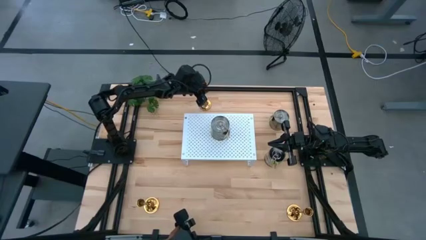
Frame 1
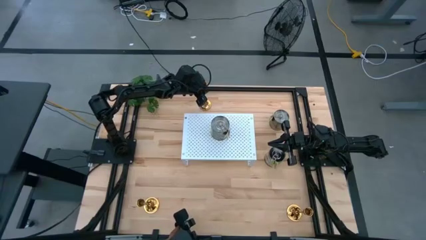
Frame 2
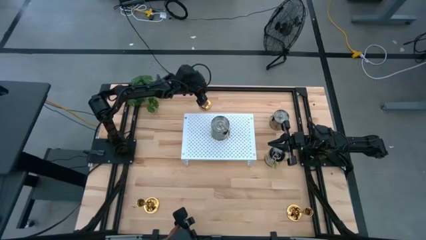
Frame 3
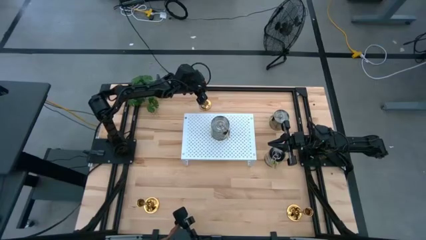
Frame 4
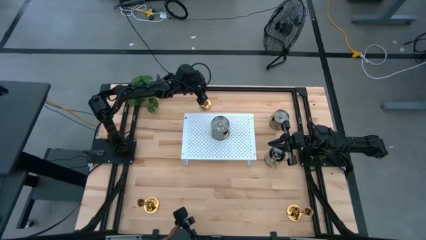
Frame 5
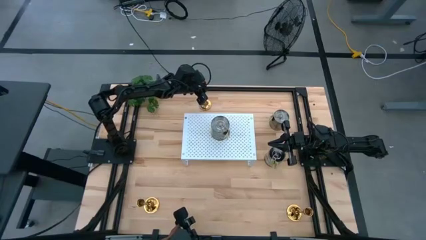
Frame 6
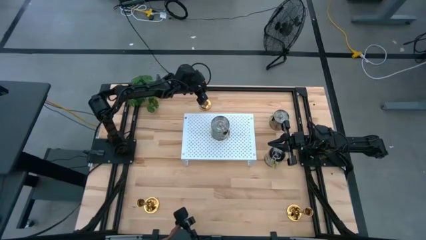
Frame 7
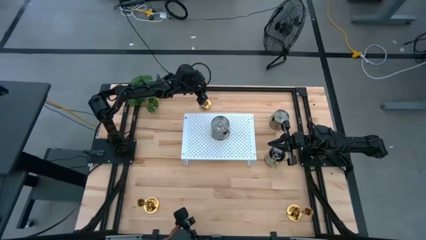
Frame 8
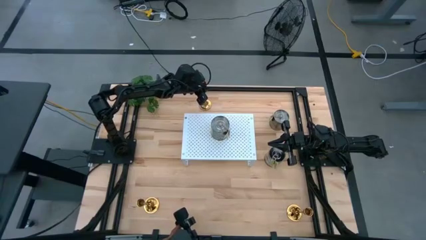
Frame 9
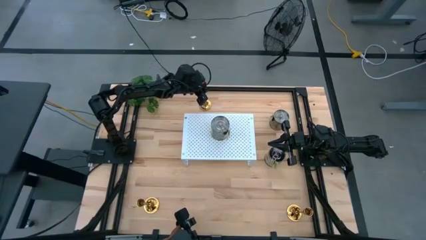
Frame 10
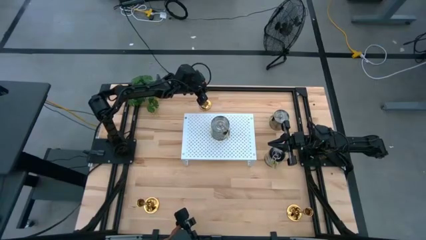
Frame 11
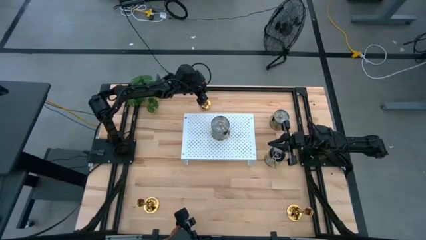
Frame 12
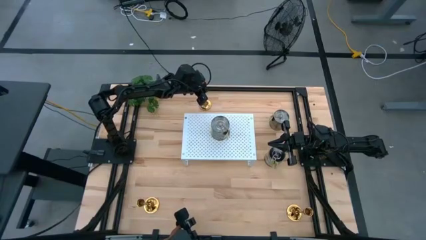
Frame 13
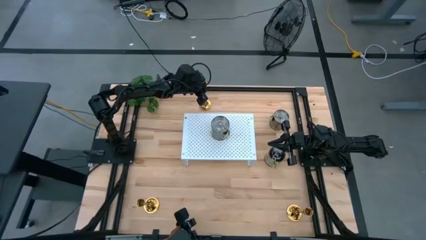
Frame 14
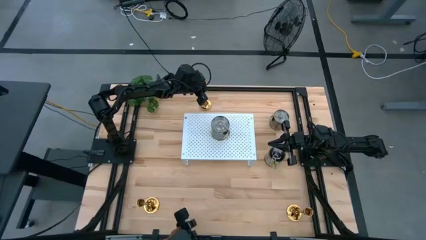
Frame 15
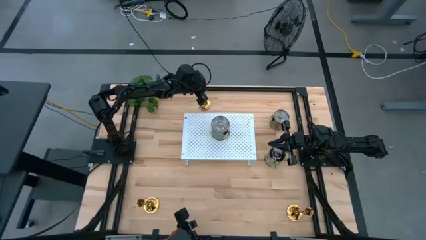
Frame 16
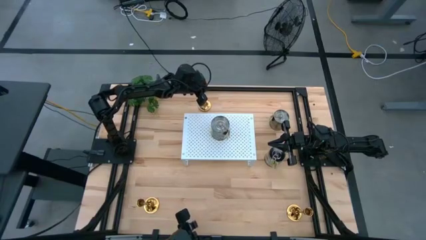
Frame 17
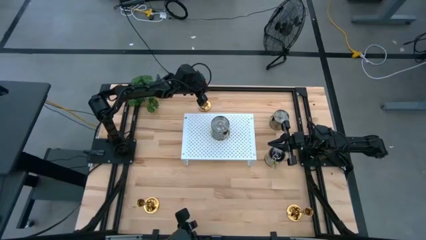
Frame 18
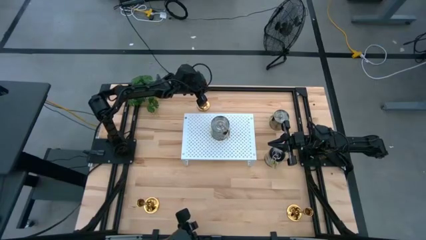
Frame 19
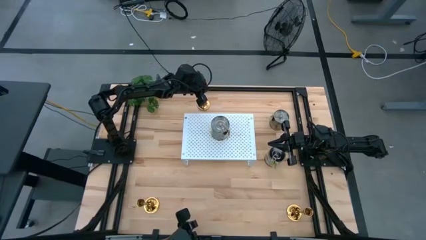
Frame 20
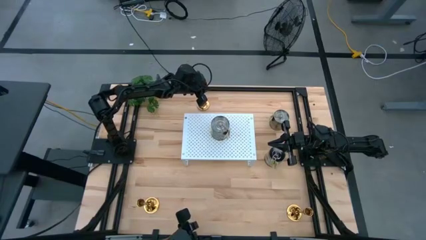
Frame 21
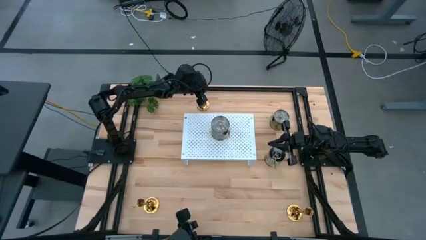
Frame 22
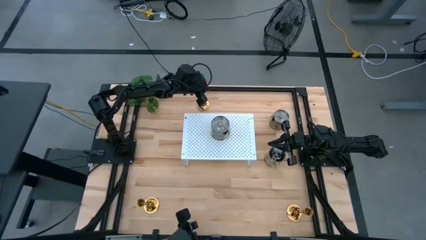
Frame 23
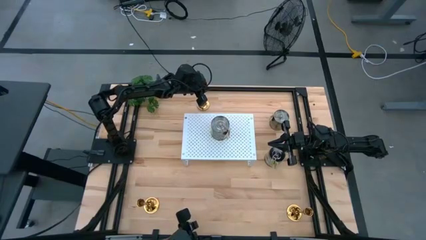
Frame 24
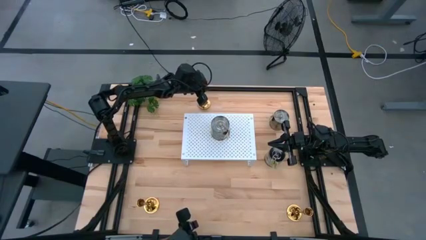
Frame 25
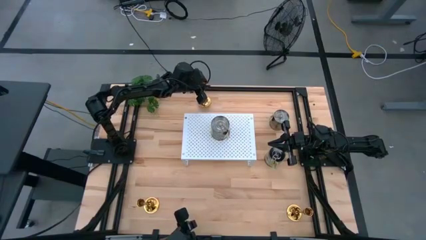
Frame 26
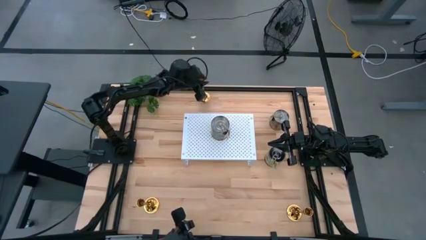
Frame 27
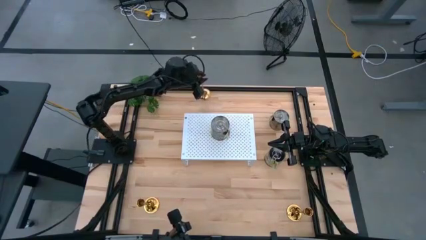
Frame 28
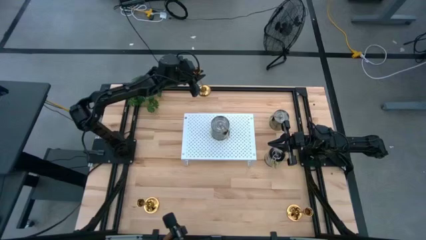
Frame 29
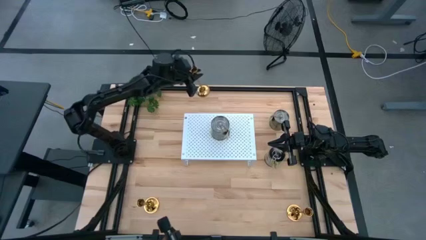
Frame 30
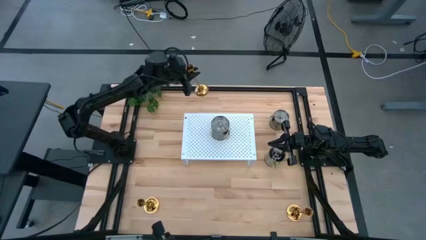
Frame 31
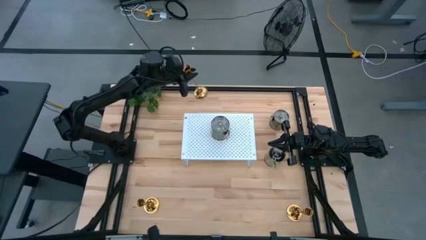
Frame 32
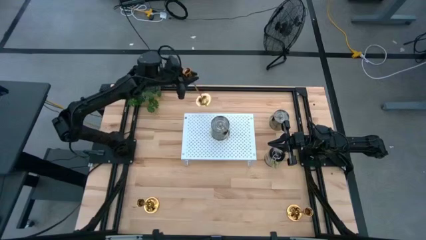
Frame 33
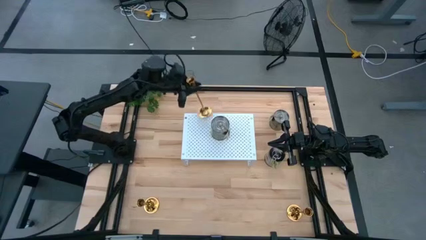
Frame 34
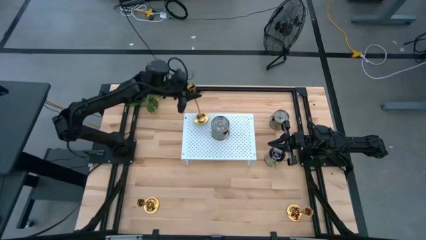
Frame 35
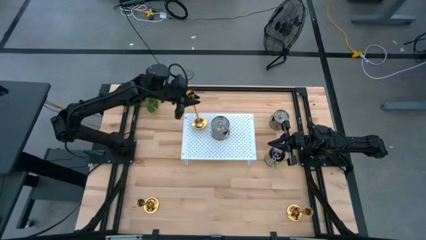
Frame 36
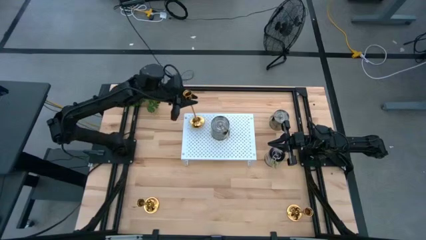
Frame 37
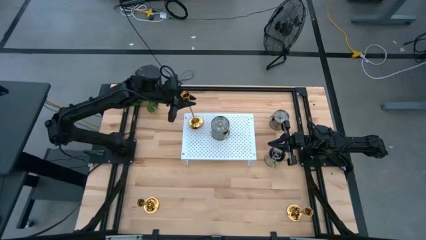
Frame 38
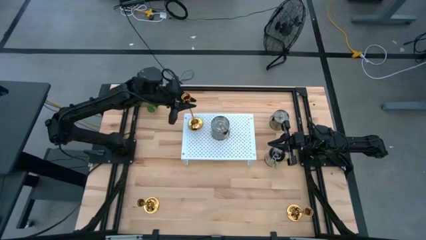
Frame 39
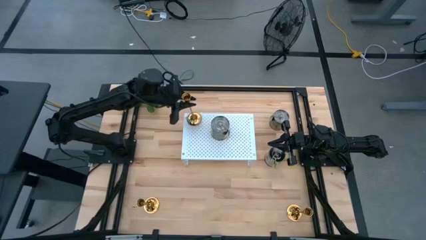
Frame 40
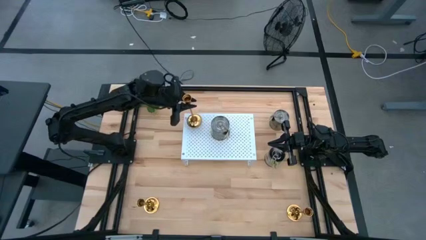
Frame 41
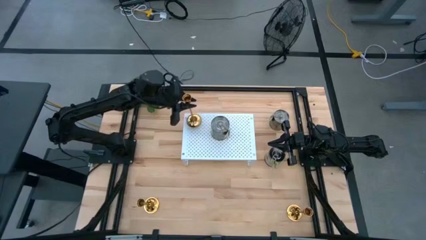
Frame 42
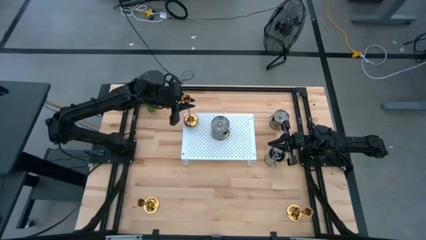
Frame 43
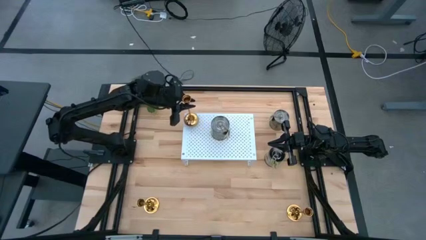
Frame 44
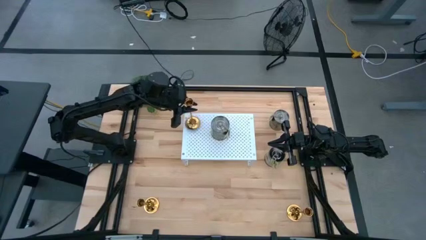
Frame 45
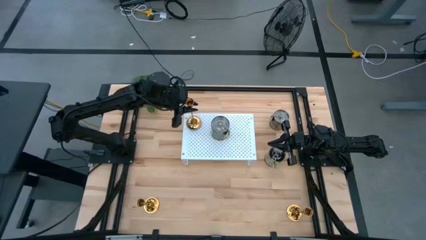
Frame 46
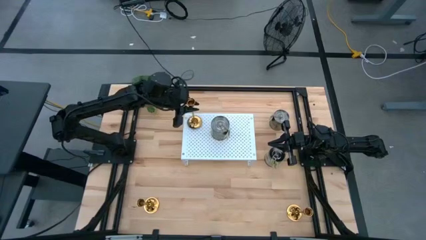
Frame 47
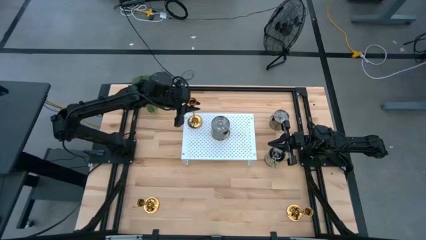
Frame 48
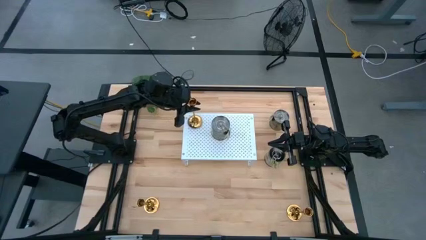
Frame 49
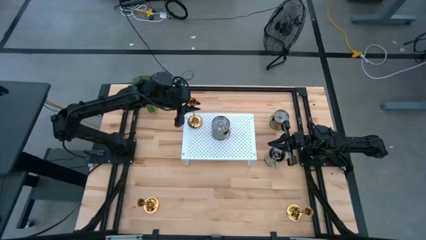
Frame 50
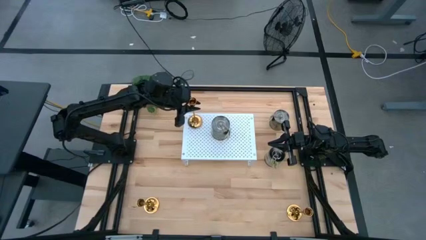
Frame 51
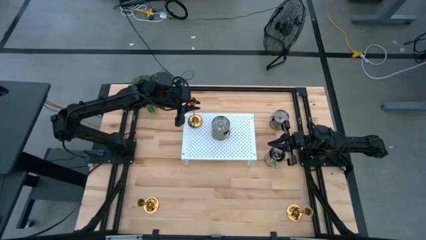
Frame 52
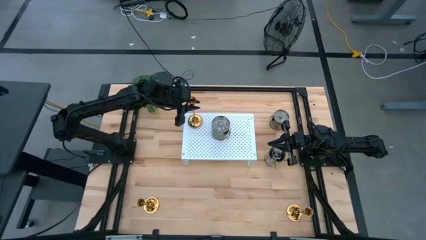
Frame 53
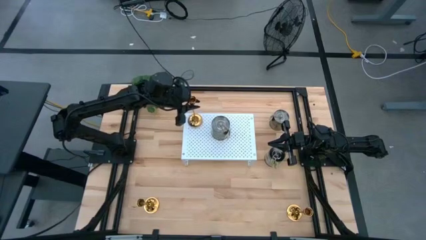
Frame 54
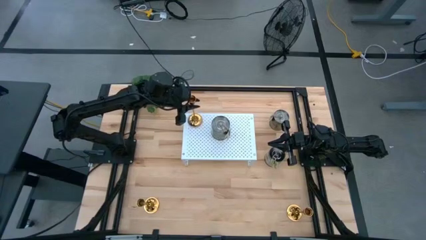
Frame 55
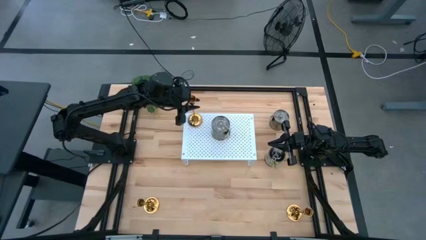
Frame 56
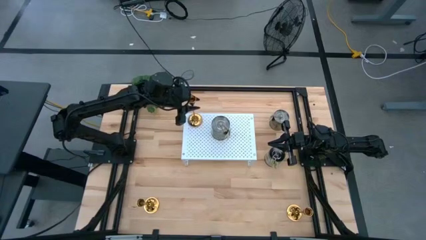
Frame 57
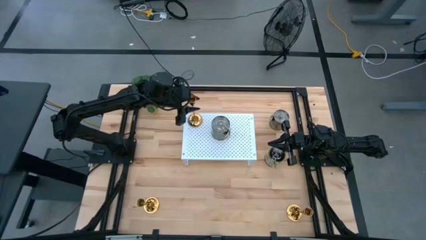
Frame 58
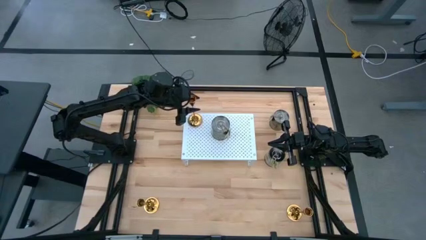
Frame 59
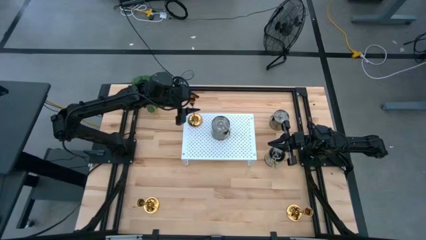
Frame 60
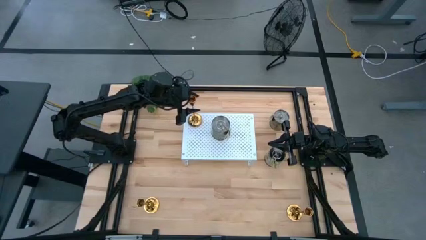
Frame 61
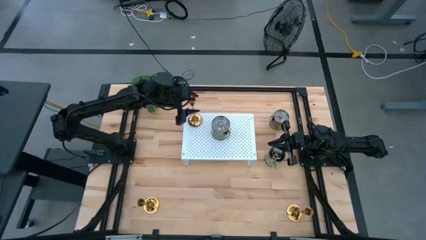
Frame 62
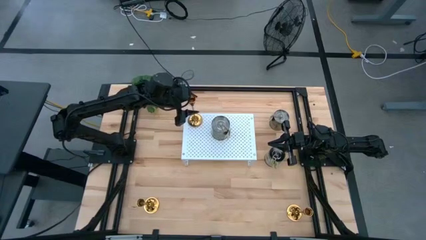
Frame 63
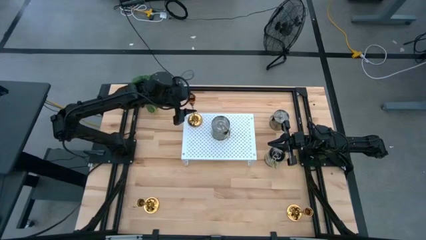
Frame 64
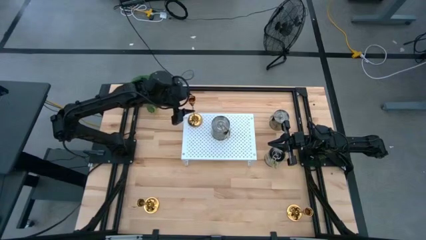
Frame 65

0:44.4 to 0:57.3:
Task: Pick & Place candle stick holders
Put the top center golden candle holder on the shelf

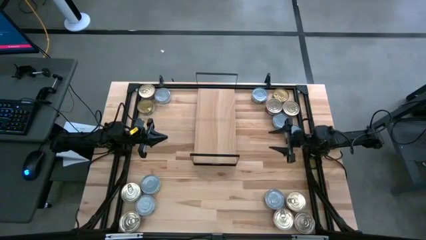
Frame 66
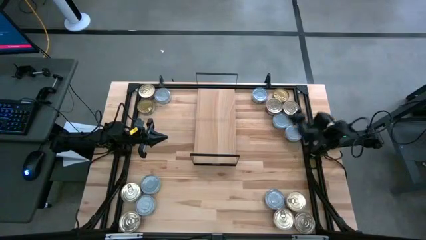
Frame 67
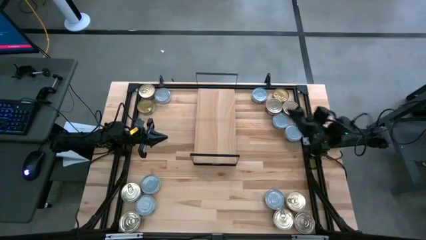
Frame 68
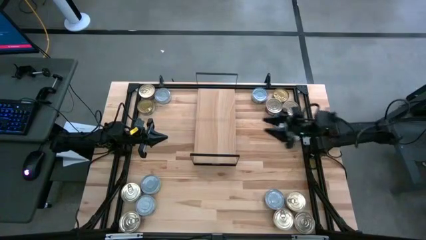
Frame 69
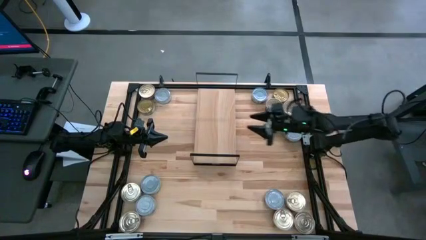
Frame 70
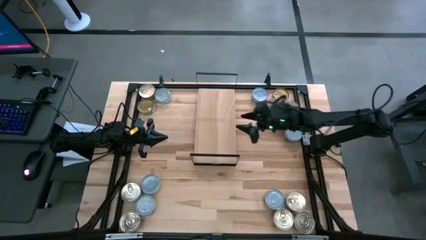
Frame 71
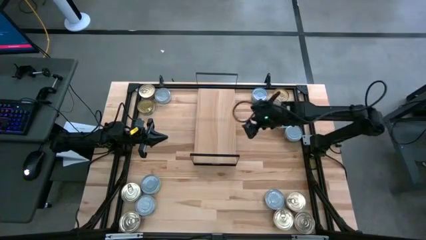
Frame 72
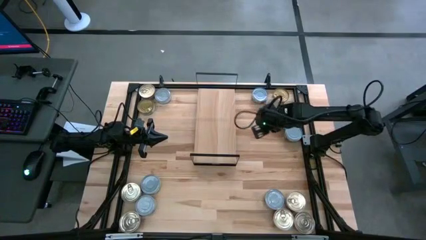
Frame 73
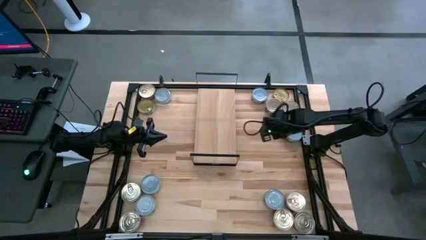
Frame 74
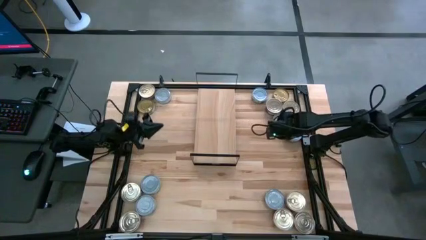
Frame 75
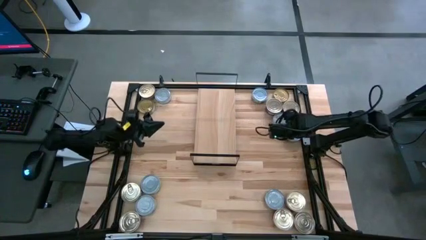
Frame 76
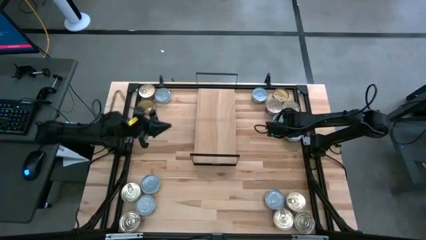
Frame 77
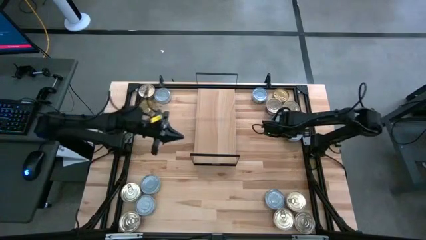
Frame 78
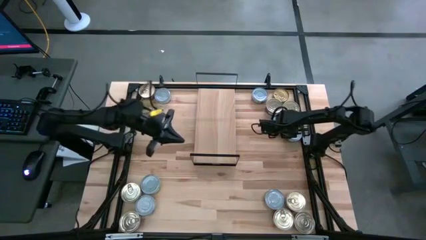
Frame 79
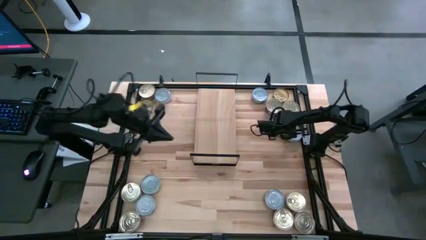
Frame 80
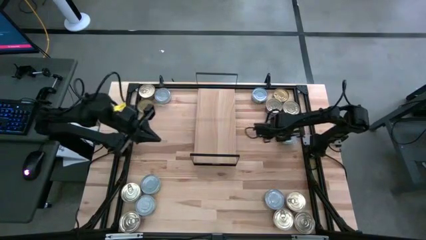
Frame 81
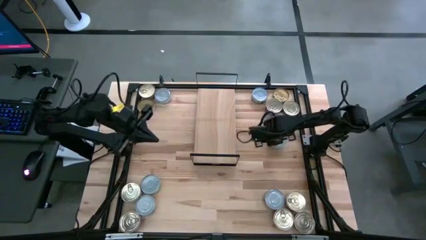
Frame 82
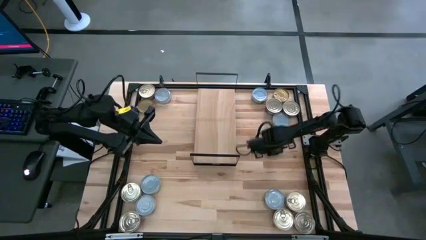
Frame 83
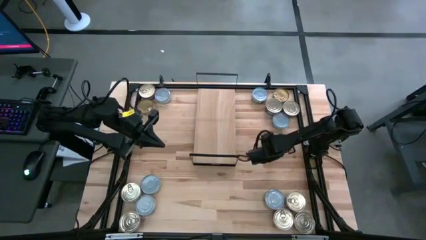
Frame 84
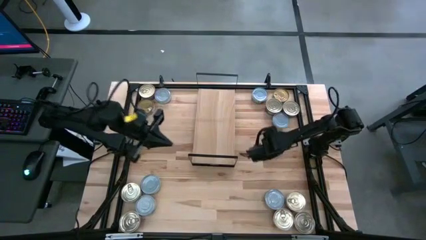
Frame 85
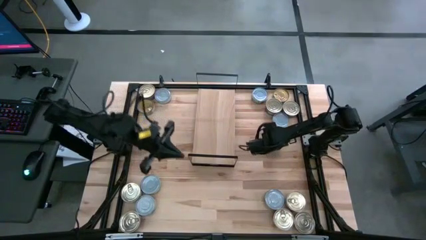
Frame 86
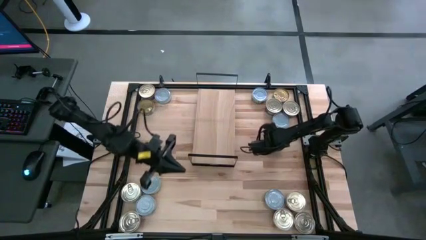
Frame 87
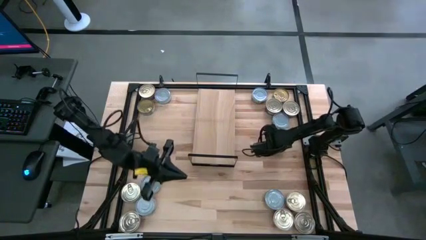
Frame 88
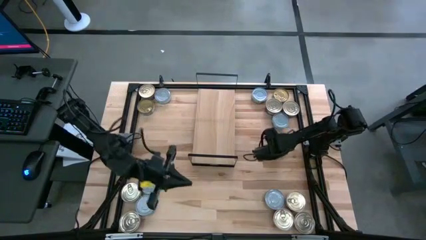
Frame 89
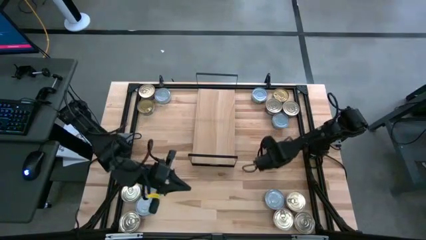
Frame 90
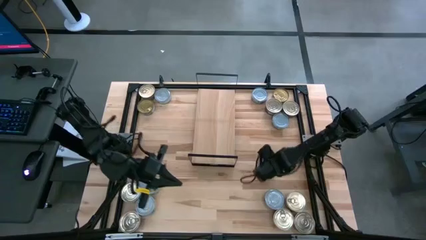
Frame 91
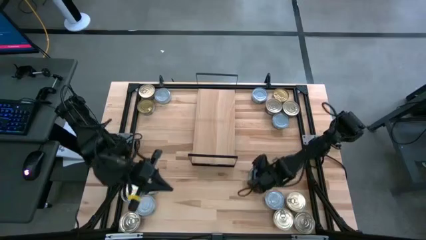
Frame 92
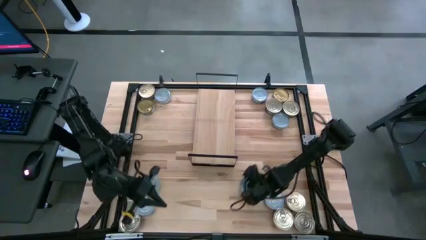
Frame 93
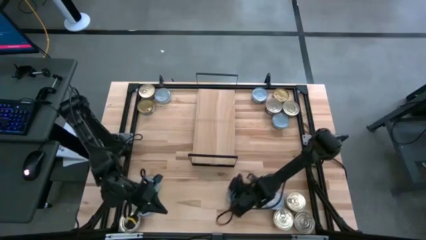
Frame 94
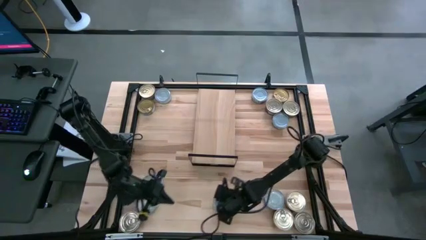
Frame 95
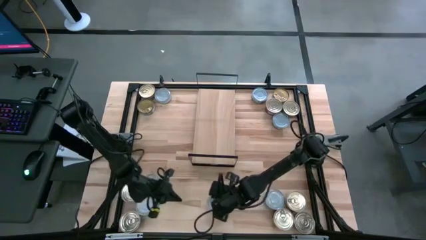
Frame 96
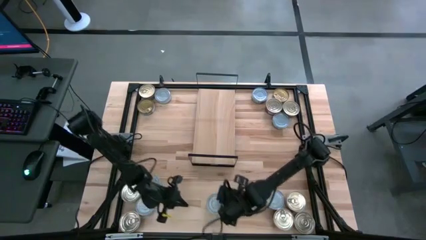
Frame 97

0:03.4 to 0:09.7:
Task: Stack canned seafood by type on shelf
Move the green tuna can to the bottom middle of the table
